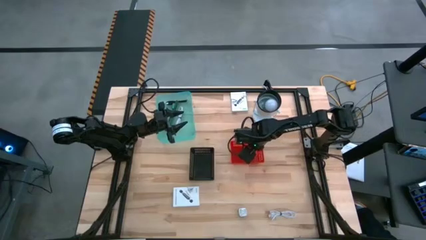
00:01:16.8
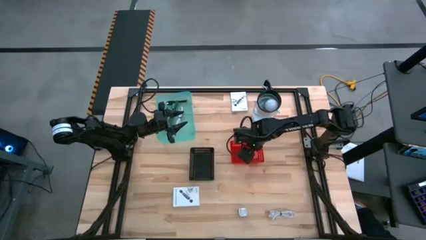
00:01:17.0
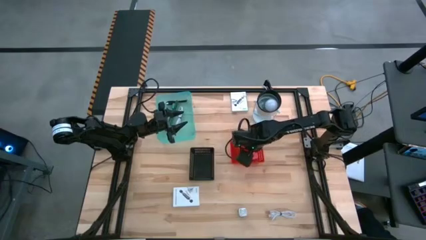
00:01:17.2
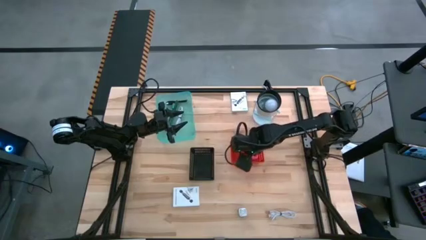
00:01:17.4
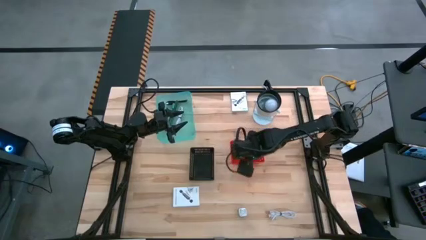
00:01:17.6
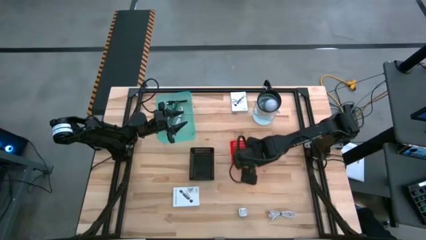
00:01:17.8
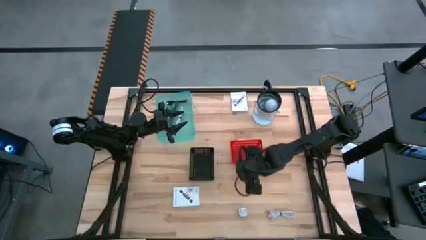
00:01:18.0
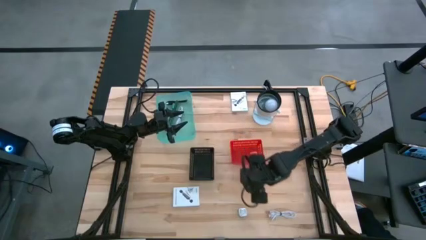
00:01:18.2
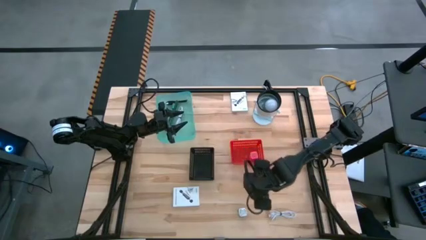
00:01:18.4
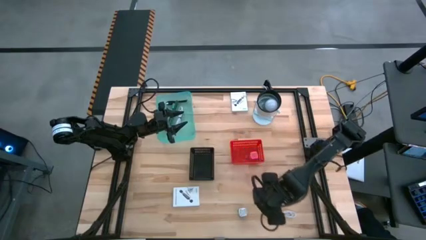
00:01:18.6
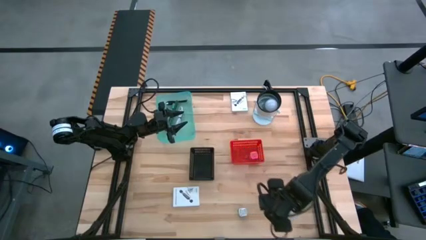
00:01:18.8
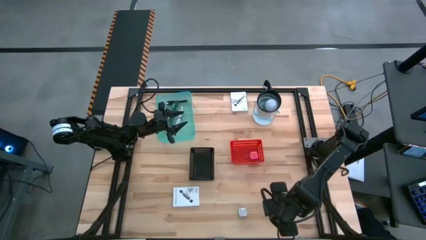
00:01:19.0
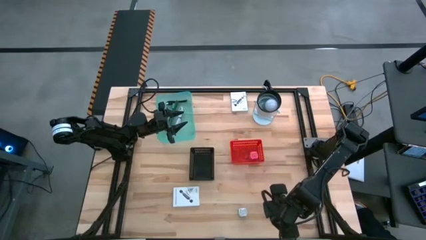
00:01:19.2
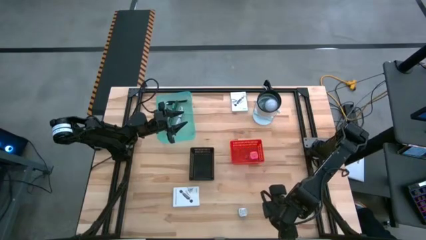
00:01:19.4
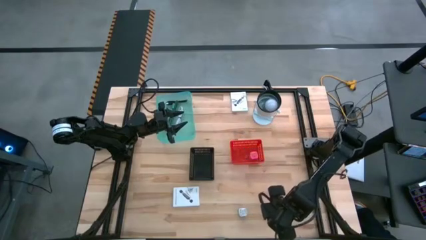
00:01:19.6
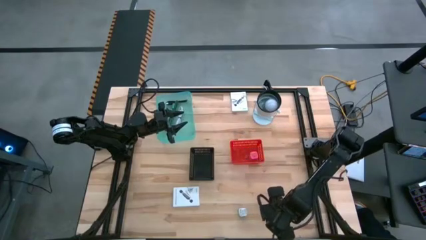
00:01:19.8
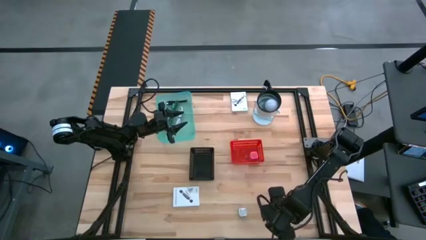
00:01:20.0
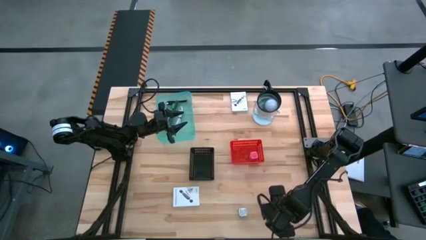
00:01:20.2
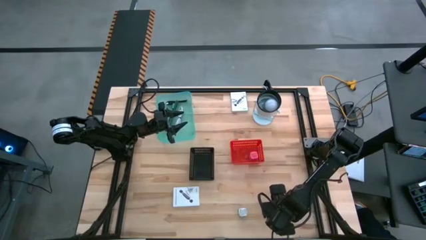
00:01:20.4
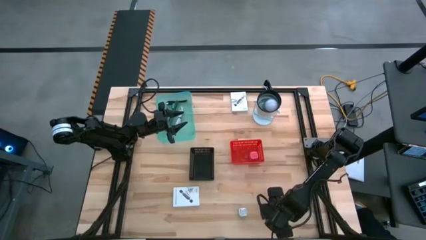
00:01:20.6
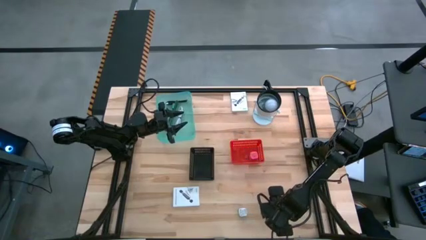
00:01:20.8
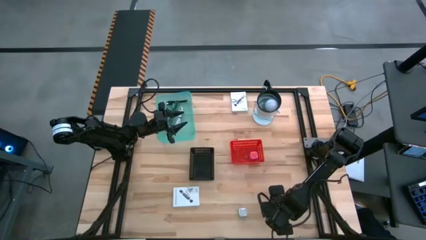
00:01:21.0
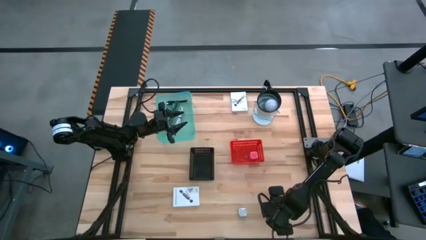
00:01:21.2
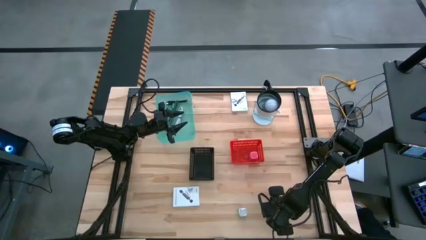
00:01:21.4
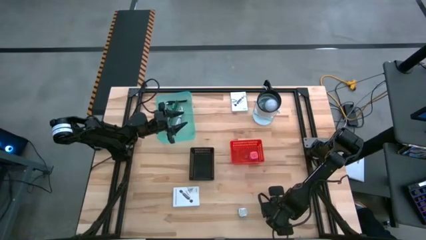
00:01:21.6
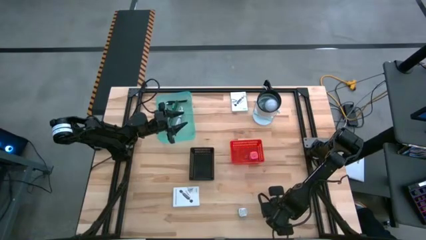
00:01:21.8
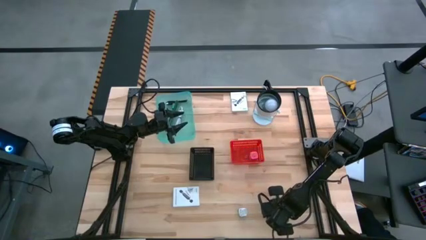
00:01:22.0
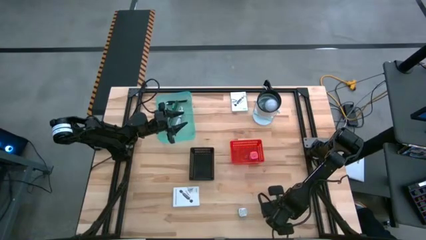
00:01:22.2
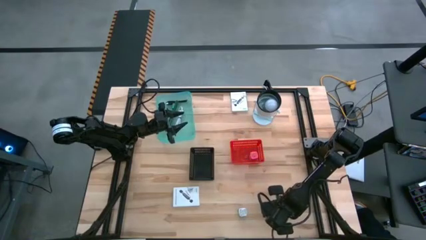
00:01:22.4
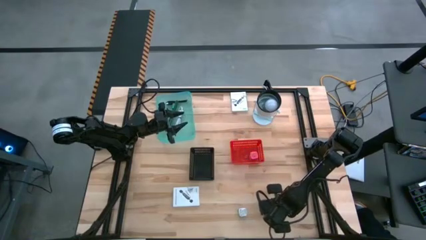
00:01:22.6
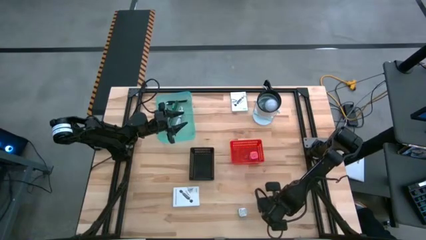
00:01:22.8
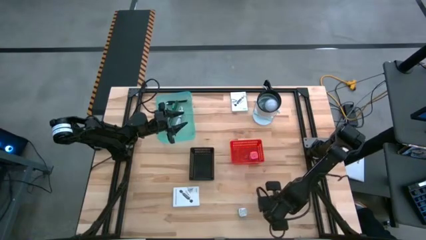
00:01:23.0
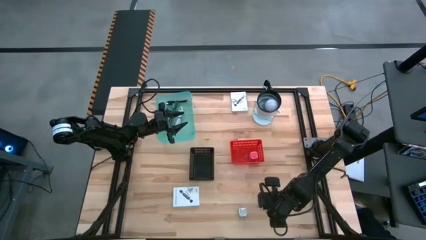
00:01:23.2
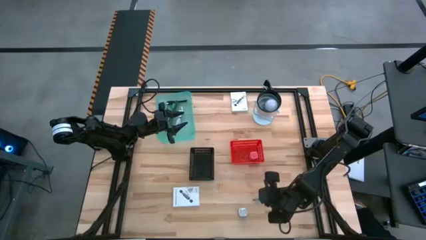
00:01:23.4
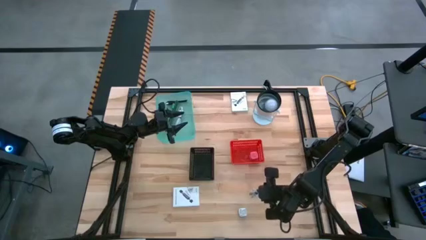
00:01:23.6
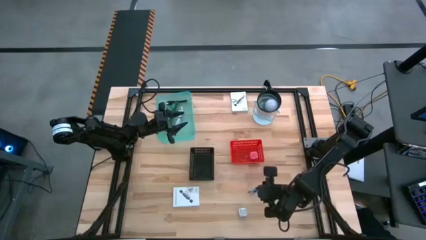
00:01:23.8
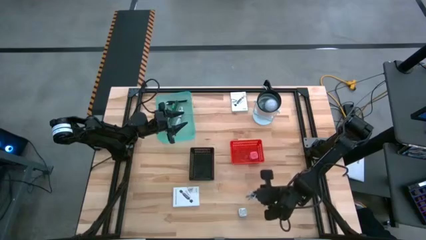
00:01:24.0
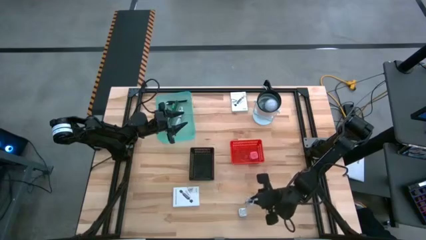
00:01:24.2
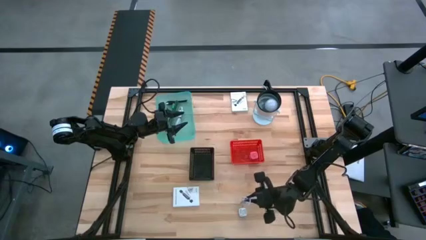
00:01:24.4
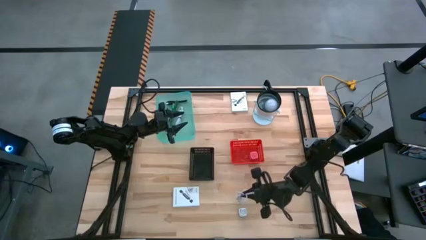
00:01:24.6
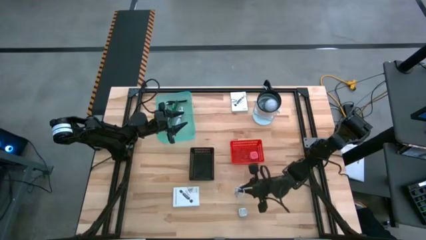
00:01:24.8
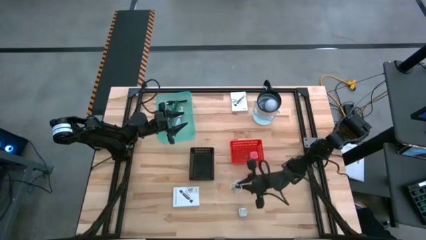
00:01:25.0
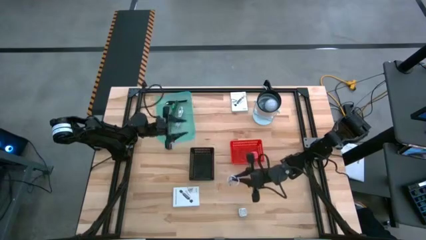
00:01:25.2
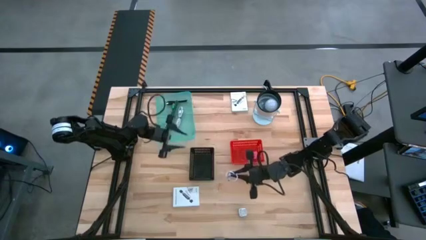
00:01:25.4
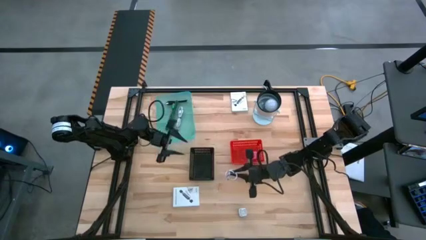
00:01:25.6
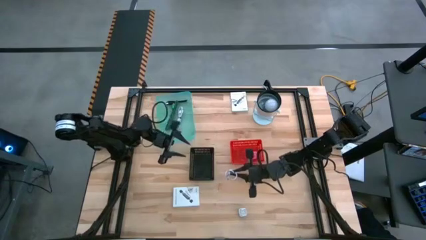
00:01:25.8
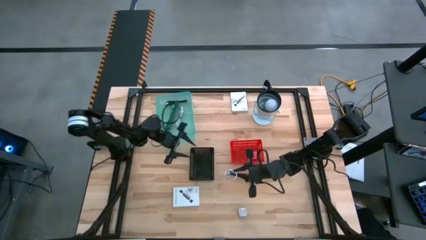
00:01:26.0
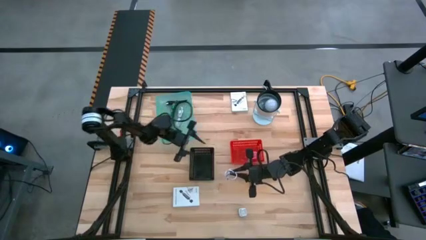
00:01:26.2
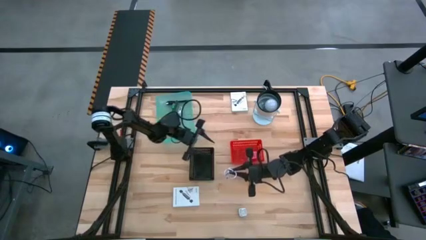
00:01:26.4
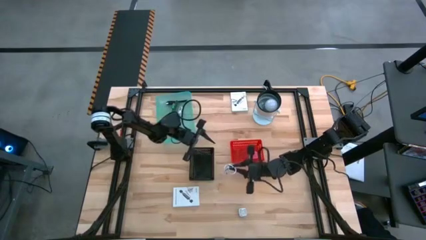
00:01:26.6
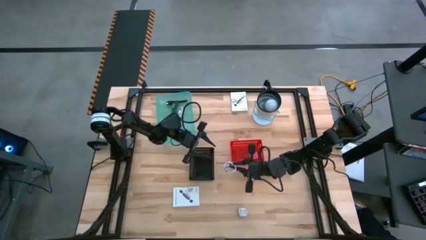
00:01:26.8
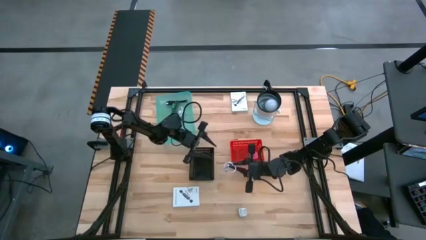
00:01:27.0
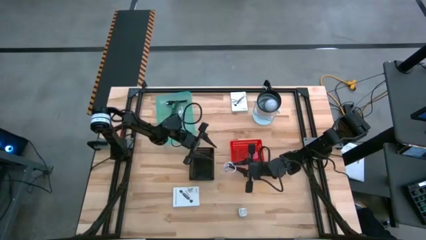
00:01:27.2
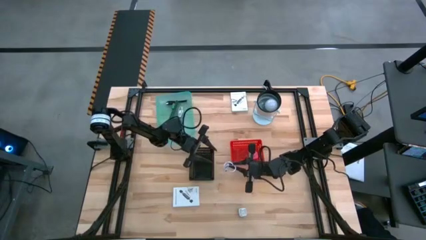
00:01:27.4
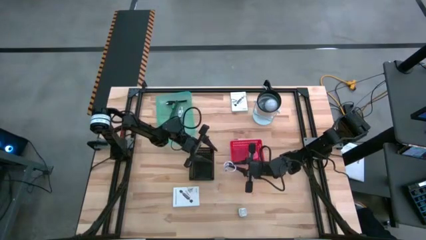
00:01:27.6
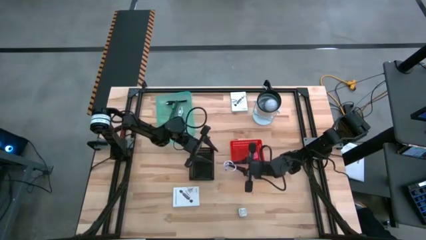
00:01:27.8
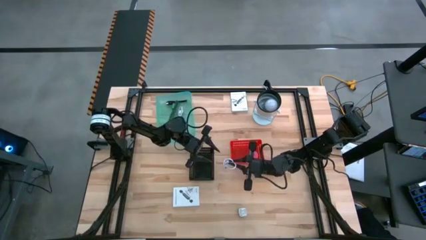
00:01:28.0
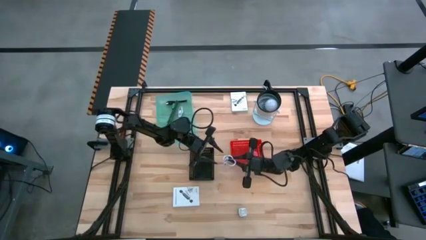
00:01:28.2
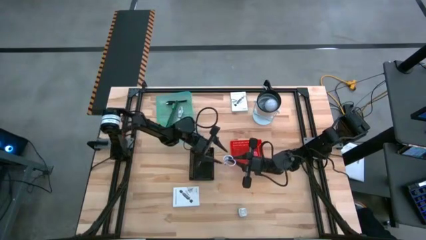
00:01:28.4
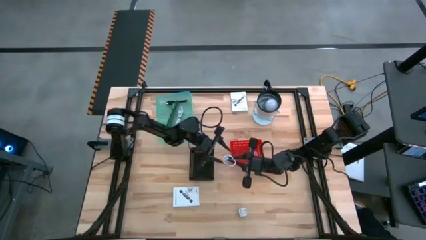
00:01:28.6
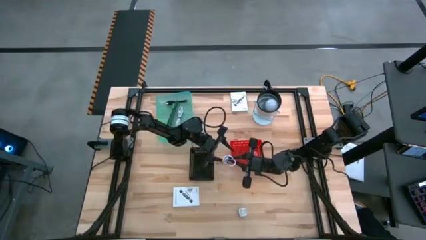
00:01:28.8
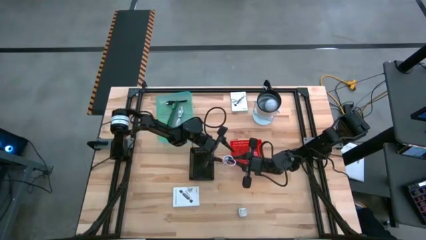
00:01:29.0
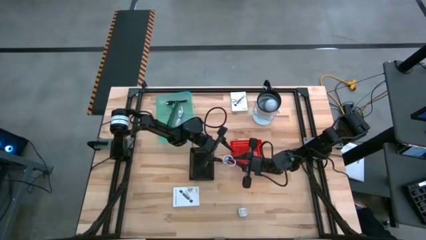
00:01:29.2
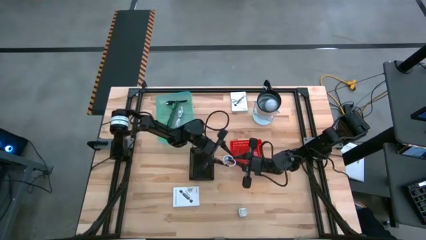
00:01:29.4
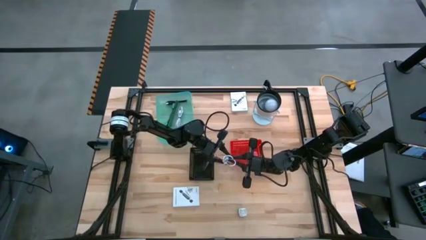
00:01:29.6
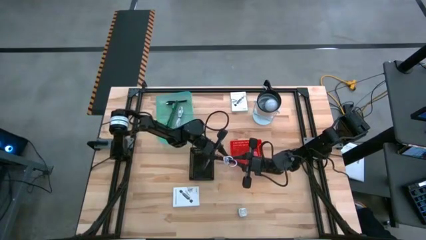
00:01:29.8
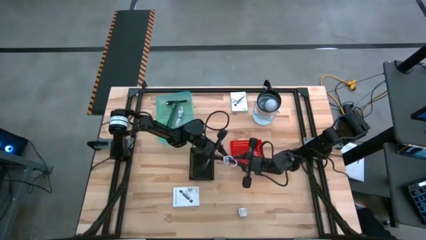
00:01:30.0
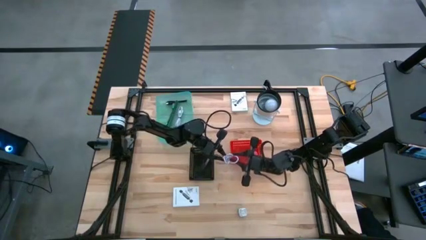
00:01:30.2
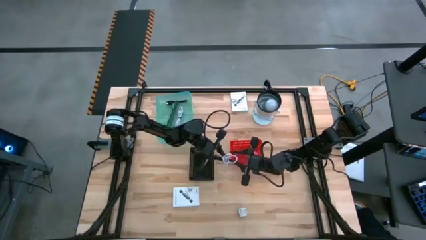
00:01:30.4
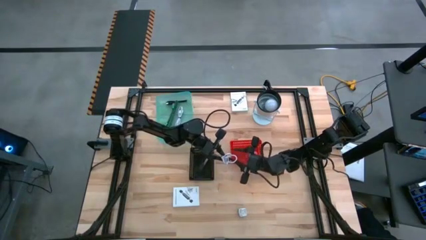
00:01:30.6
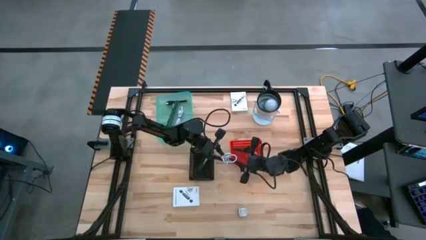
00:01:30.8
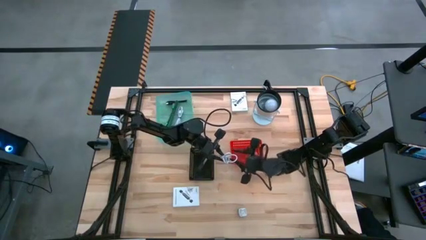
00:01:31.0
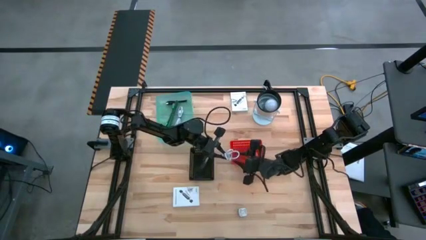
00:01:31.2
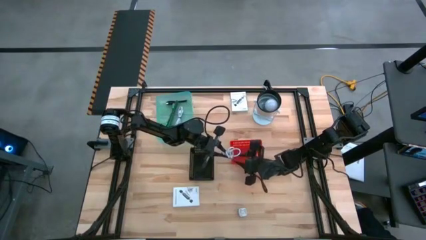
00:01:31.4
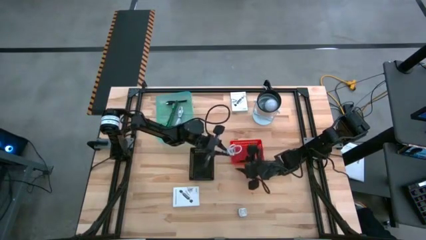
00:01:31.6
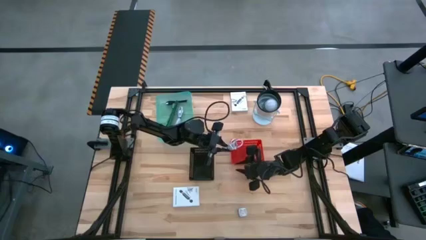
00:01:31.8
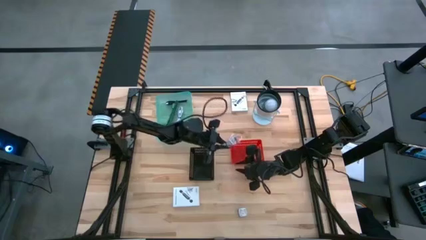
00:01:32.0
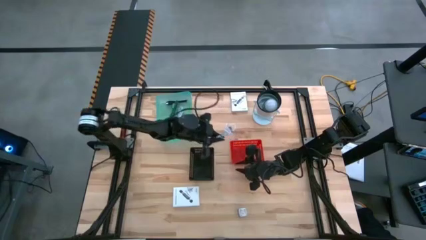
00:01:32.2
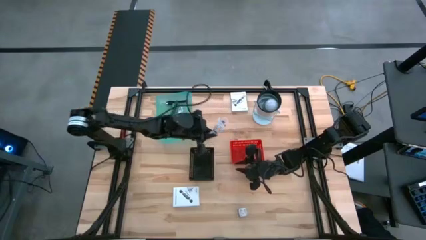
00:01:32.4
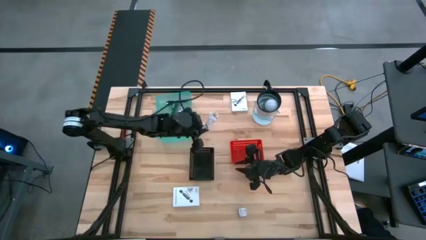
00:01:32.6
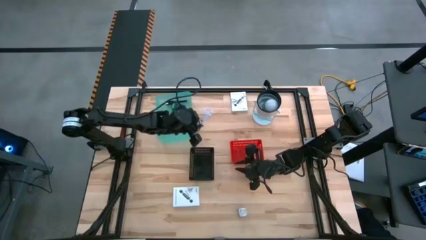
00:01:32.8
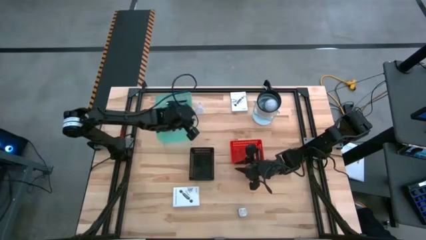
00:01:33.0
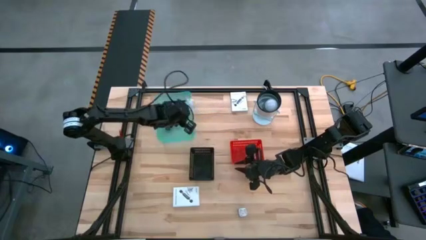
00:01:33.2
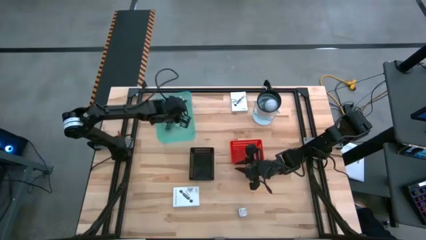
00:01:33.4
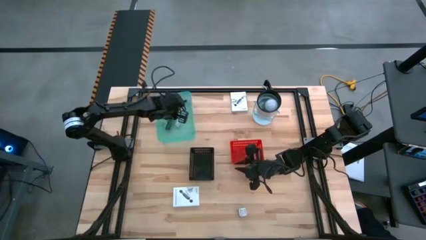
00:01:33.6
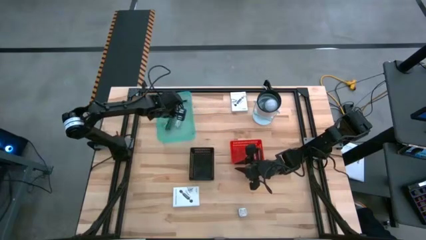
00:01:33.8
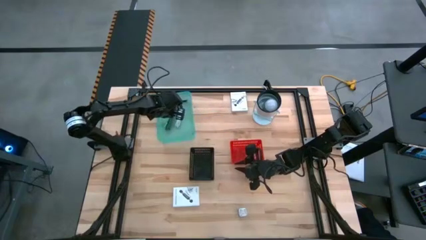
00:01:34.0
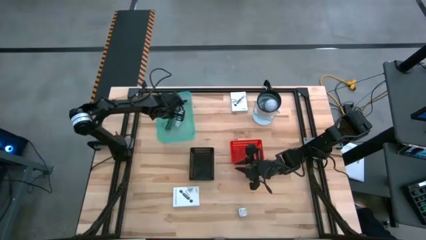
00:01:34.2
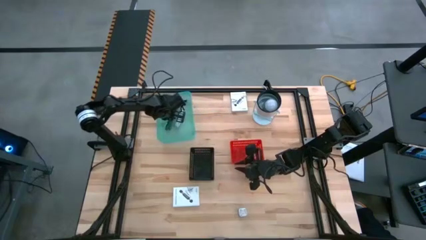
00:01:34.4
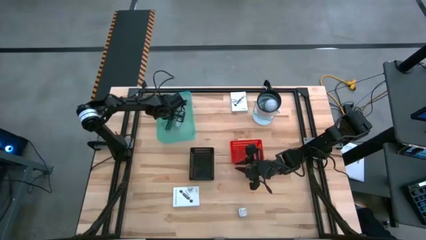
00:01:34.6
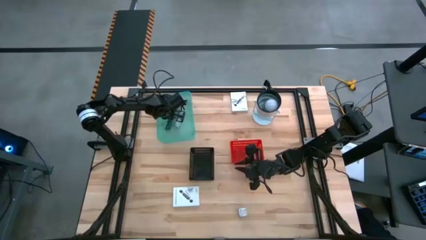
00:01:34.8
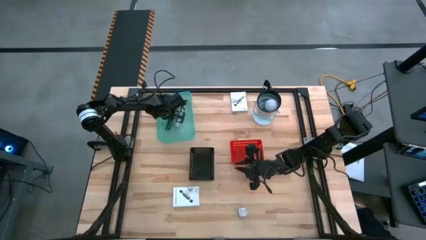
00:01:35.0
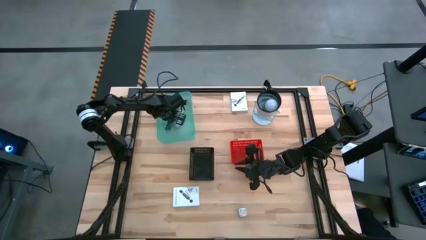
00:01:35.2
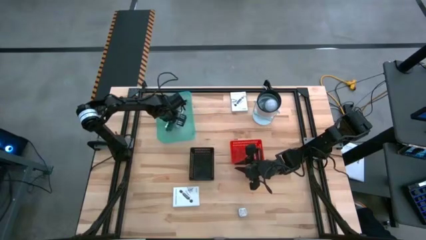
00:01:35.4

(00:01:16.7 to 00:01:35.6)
Task: Pick and place items into bin
Put the white charger cable into the blue bin
